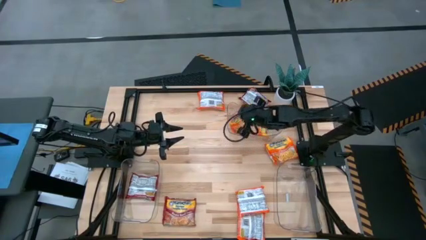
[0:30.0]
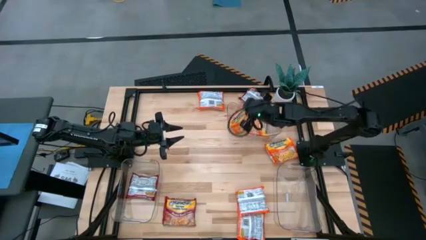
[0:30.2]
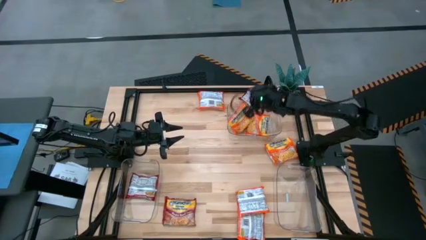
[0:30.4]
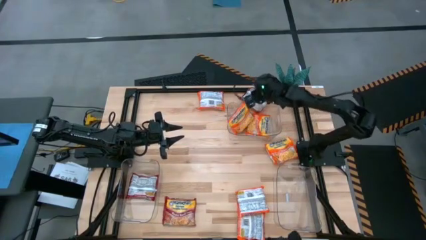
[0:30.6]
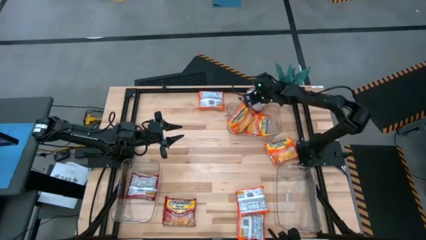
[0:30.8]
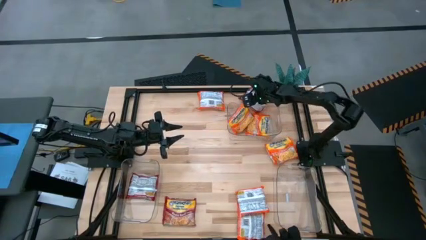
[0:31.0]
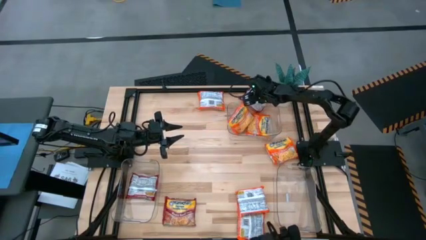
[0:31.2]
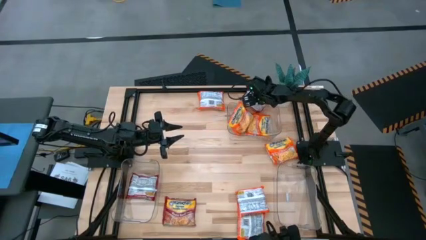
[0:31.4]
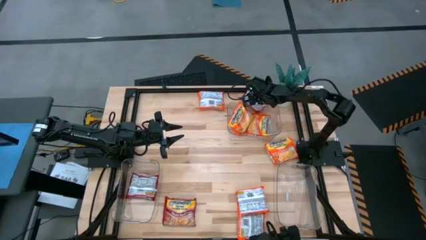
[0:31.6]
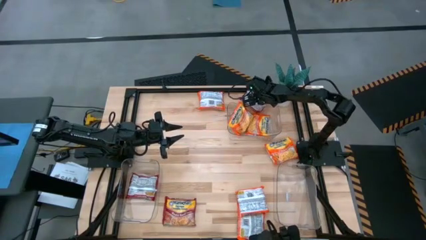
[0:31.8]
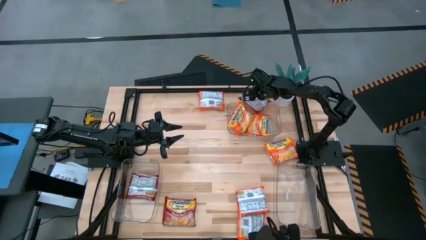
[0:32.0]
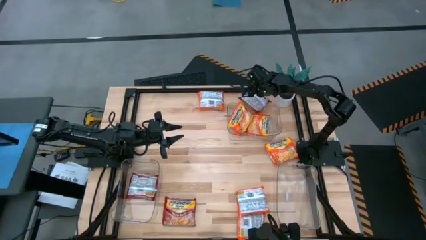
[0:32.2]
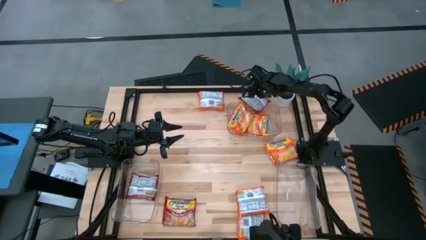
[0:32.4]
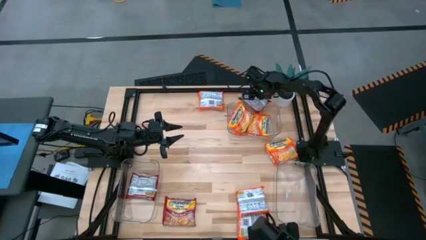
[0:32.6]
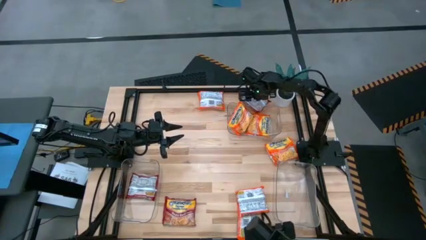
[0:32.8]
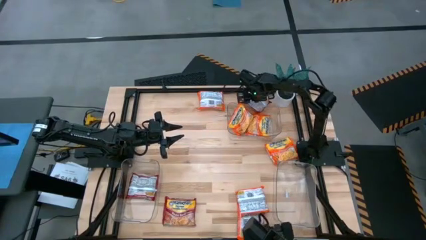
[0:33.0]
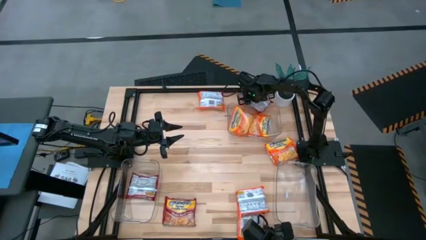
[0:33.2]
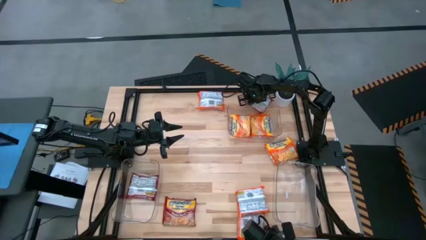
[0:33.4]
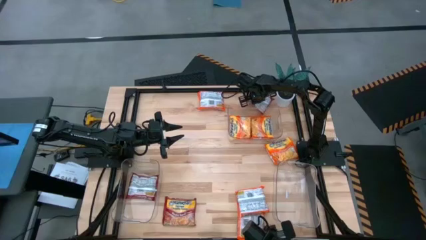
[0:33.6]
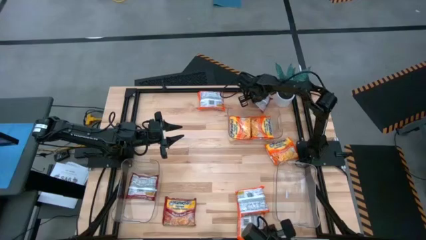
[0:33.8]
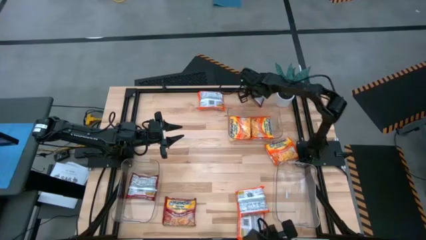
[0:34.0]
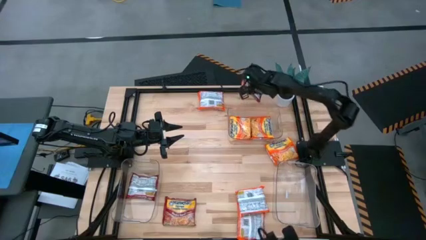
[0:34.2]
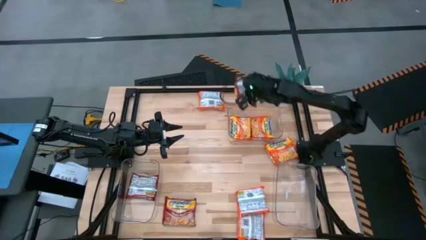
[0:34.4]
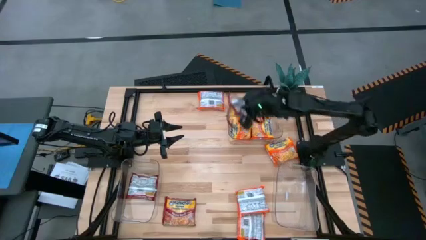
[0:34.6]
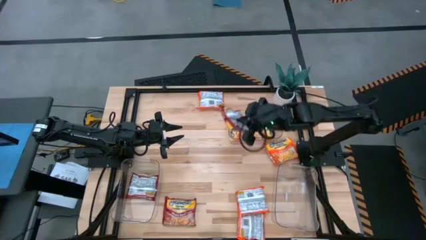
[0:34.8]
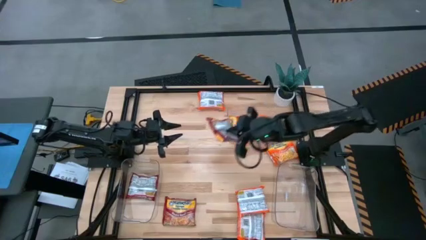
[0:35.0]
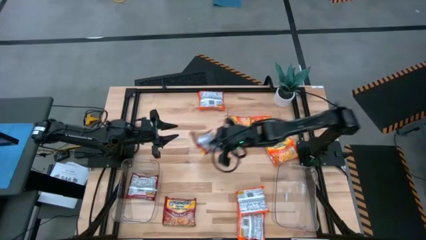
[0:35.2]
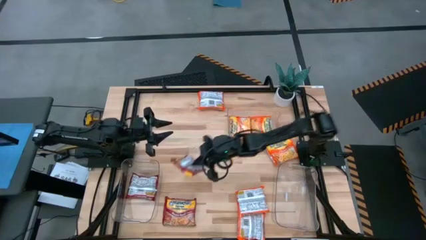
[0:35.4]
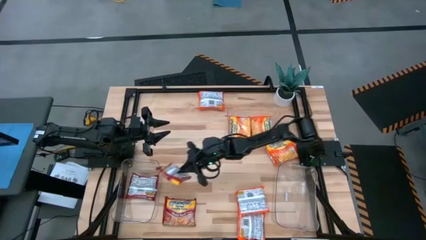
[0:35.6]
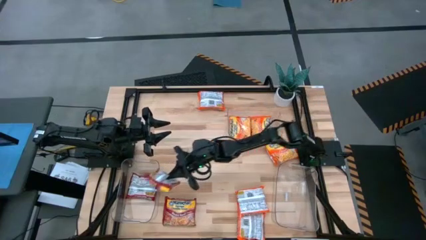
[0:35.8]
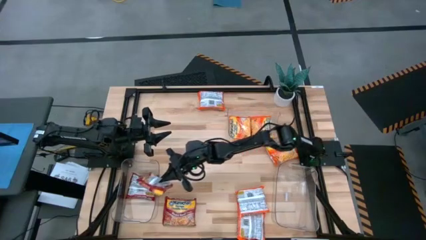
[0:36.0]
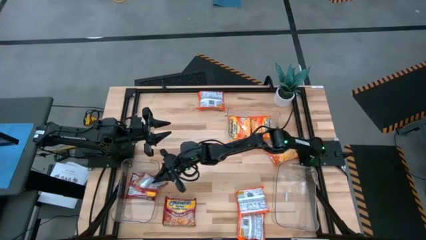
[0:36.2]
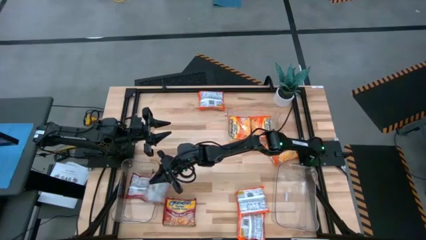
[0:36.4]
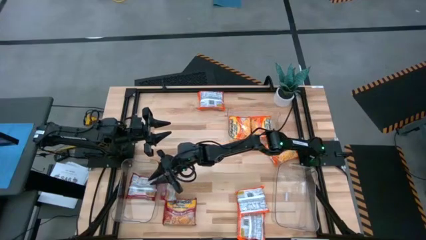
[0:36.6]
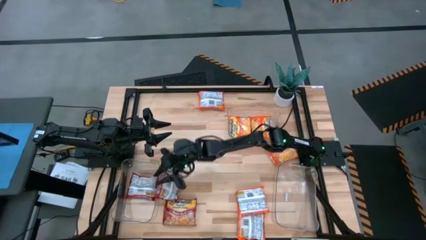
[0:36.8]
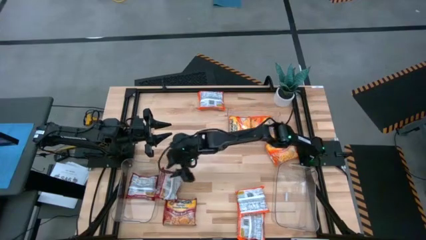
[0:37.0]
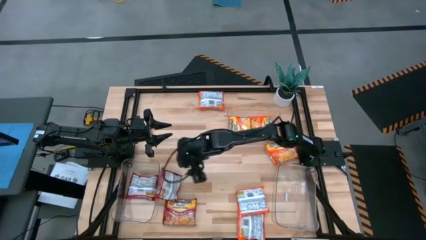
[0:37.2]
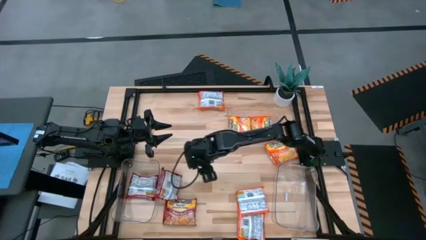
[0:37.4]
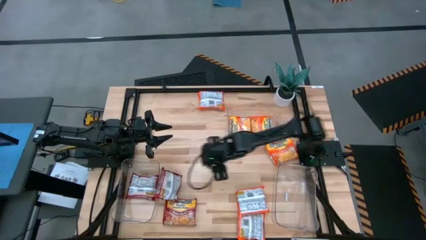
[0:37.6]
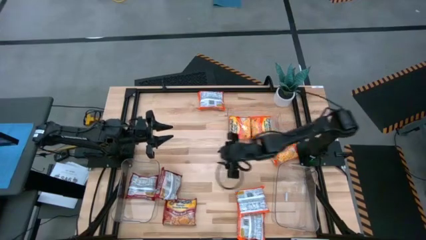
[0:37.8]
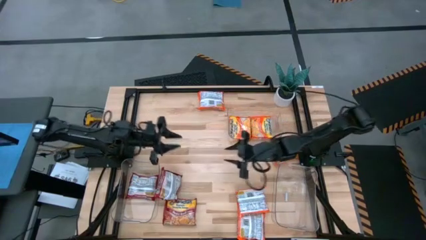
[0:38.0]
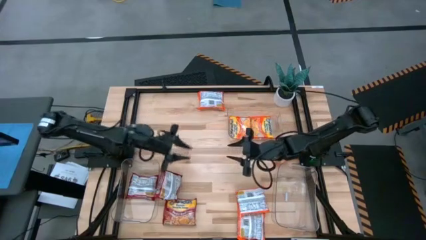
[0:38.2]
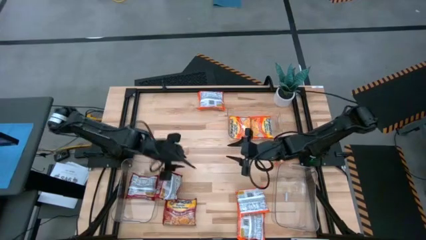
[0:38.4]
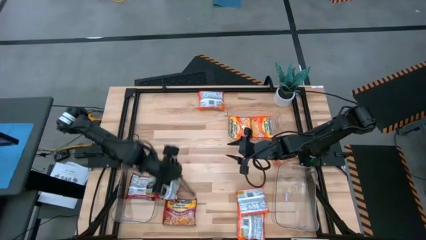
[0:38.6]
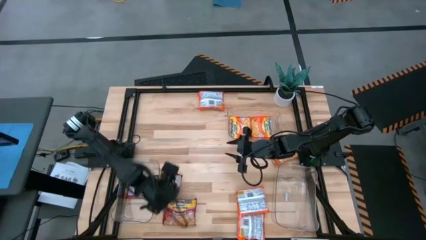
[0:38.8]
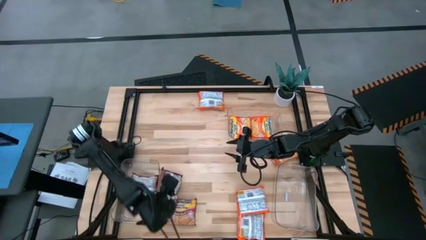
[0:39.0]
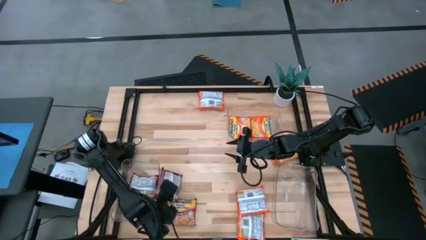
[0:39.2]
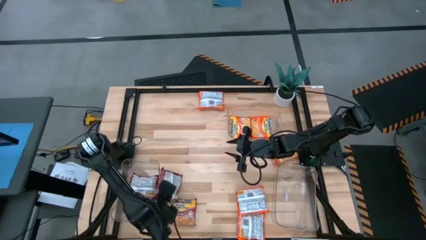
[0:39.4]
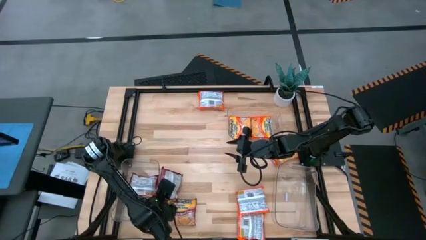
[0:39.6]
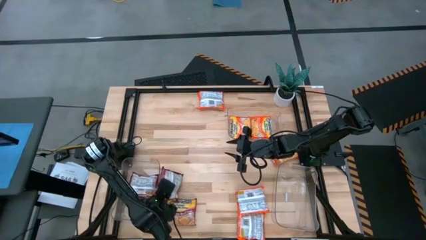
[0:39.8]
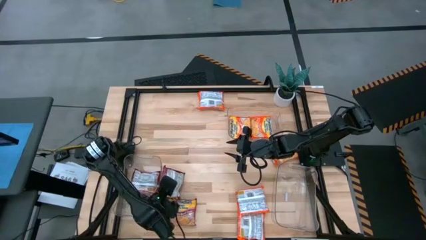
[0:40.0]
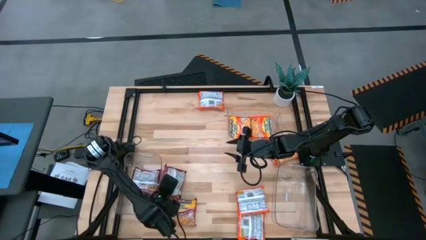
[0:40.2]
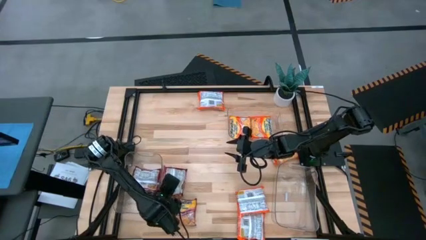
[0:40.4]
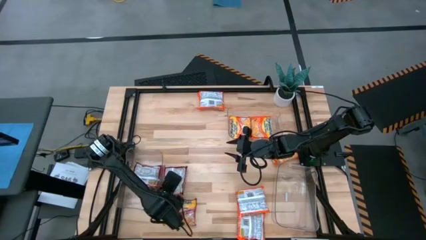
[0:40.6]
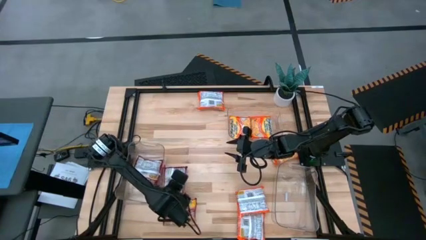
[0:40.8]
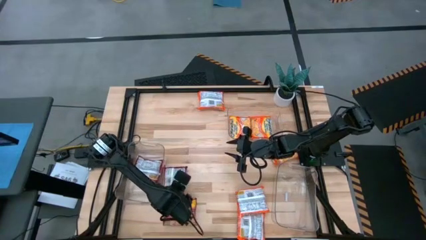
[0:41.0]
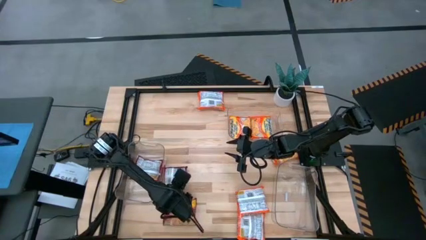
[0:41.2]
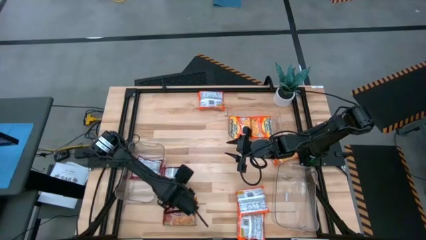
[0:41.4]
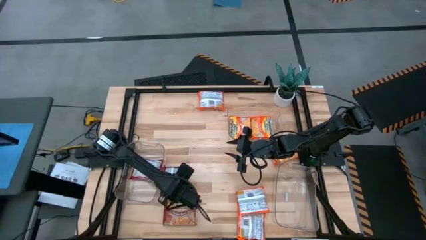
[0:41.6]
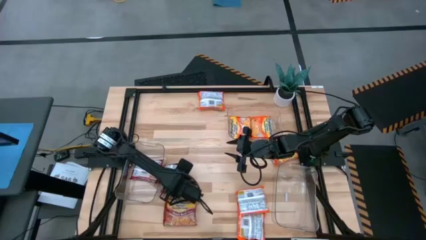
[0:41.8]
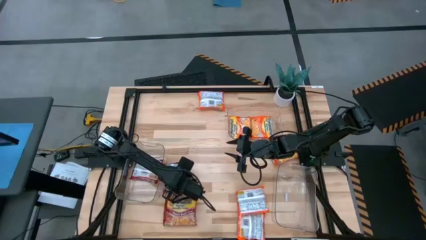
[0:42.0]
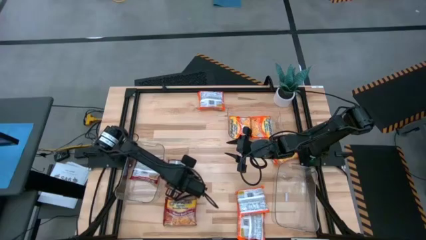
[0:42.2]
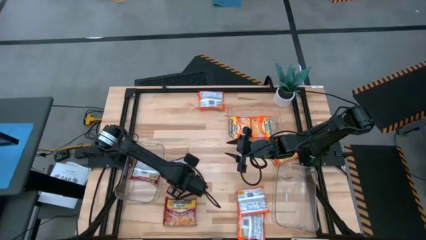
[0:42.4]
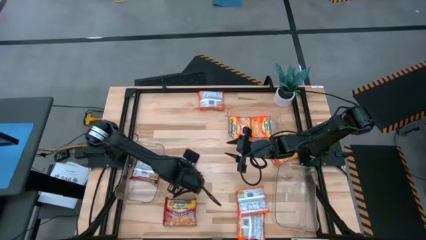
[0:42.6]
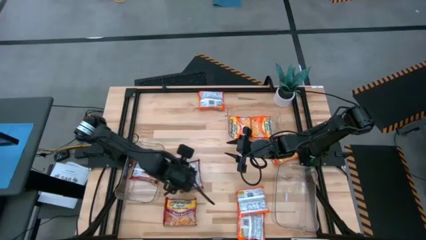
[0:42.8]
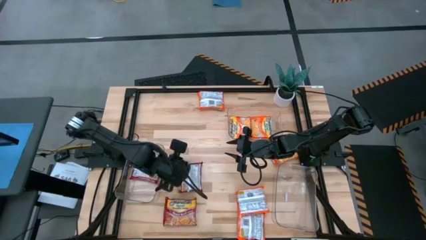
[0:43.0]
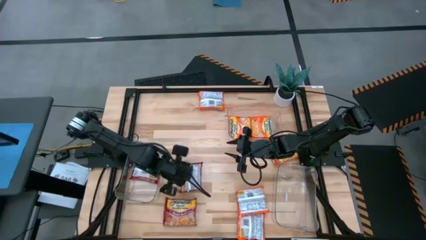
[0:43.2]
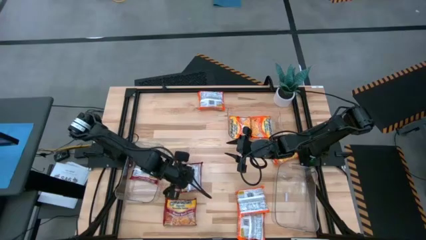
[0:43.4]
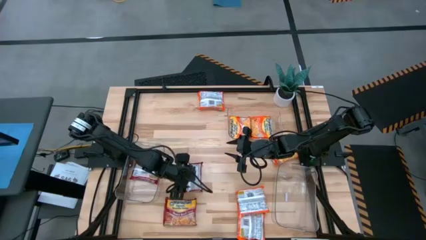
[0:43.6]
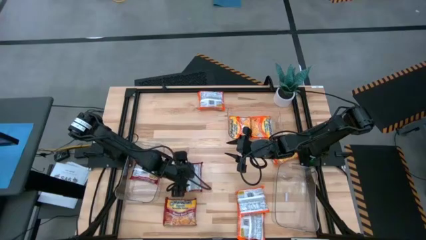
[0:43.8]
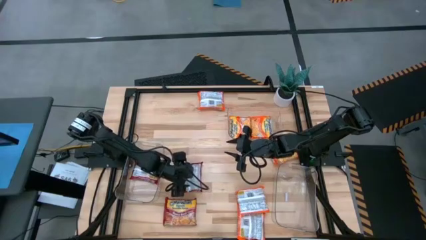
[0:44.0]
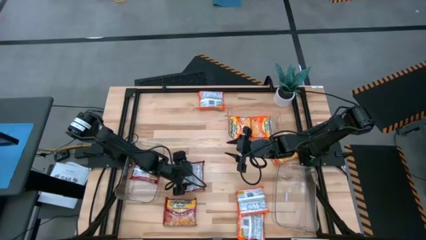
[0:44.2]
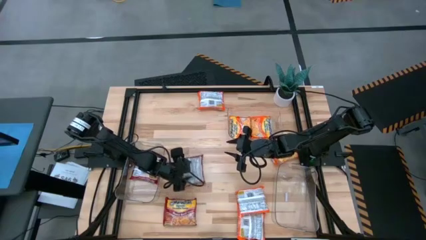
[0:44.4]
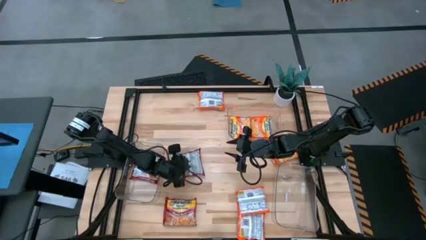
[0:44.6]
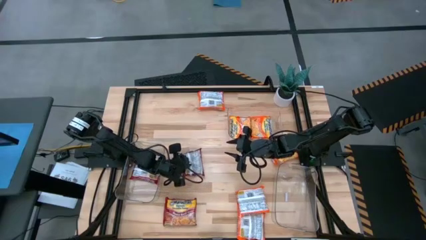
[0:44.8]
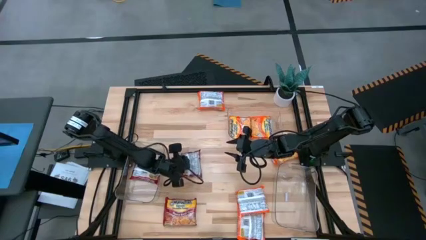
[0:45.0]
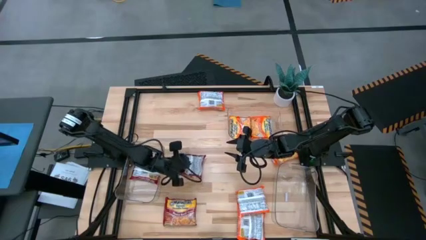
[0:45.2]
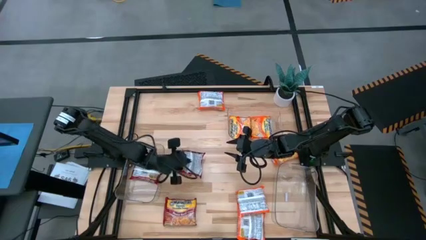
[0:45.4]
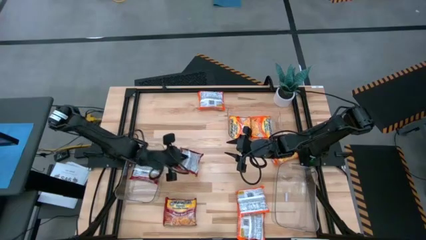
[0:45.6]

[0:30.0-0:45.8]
Task: Sort Maruchan noodles
Put the red noodle pack into the bottom left transparent bin
